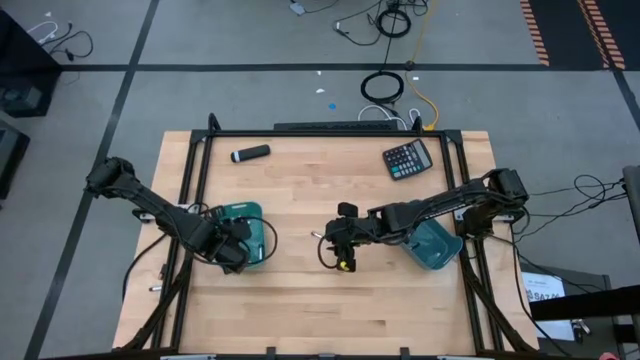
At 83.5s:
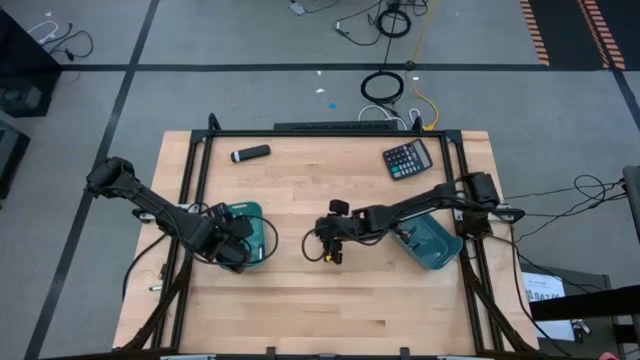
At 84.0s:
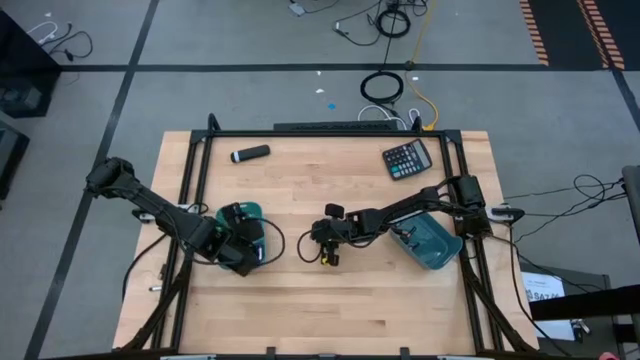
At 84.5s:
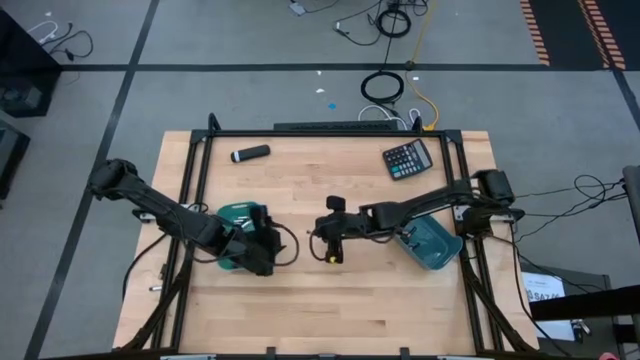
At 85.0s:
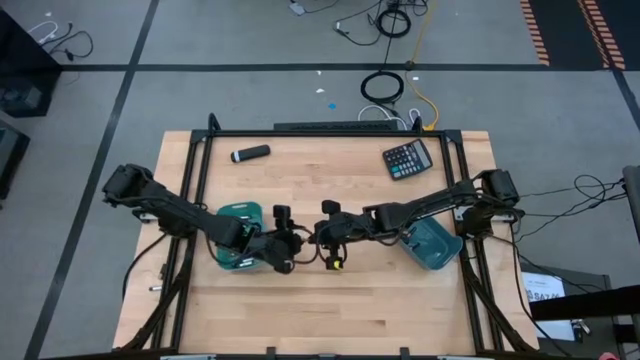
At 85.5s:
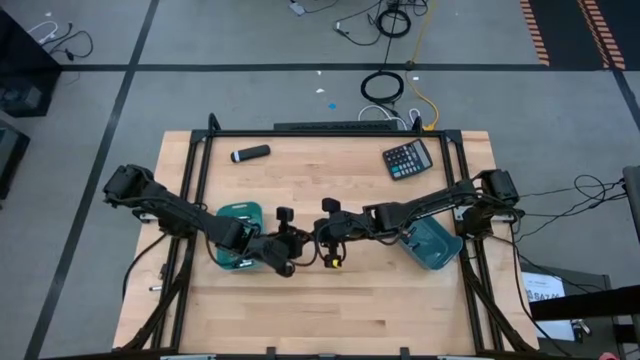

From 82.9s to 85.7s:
Task: Sort batteries
Put the silver battery into the light blue bin

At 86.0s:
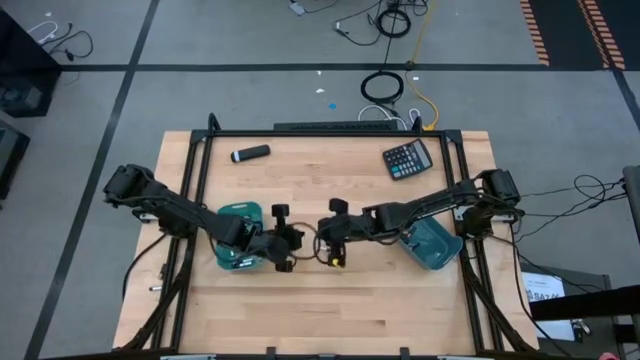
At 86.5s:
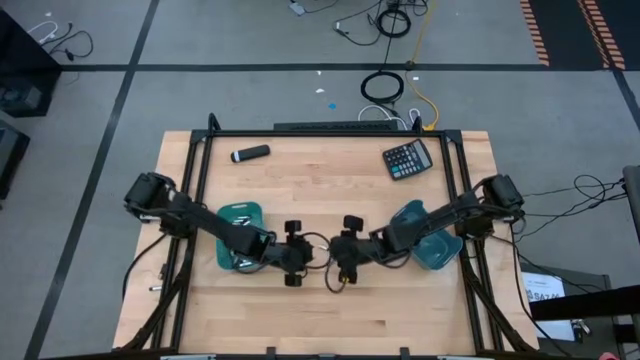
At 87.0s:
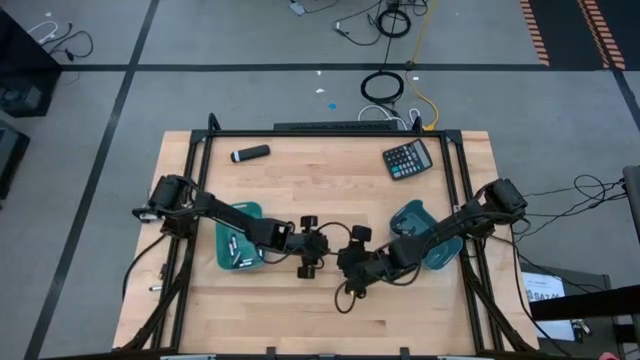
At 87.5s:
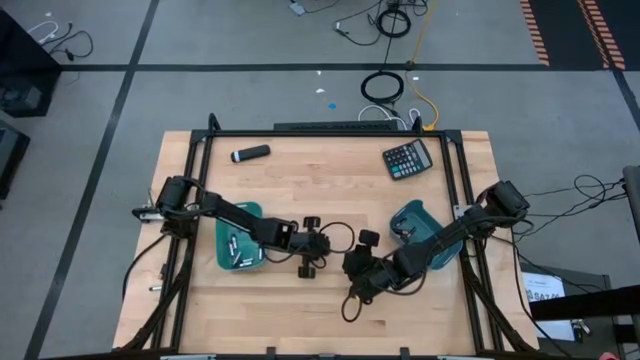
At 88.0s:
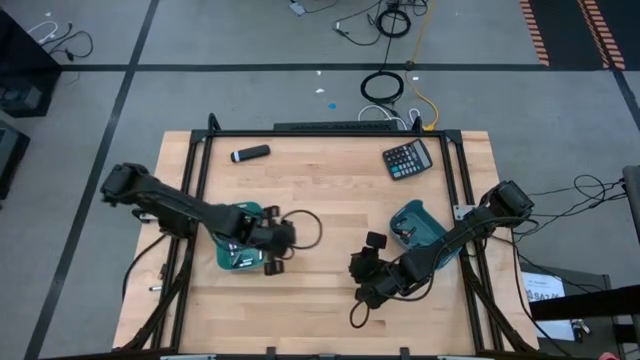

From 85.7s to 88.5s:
Put the silver battery into the light blue bin

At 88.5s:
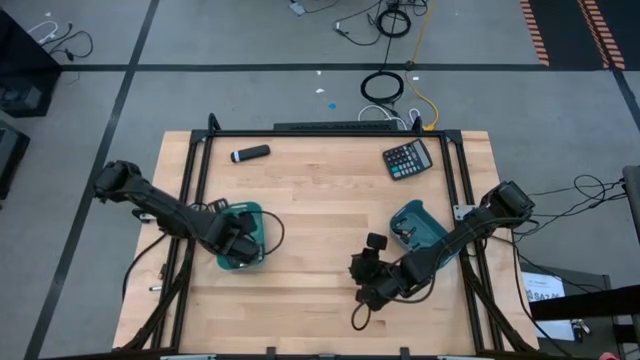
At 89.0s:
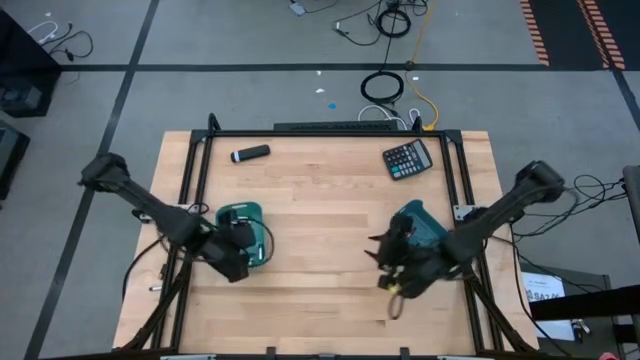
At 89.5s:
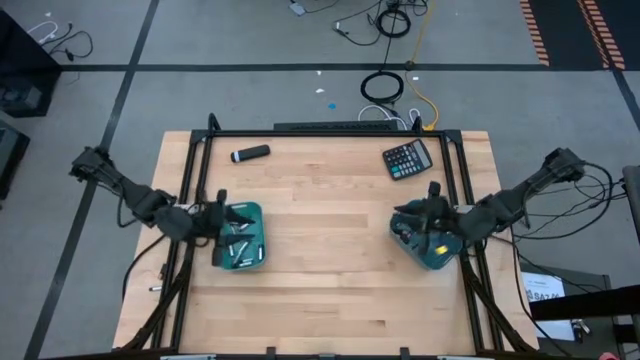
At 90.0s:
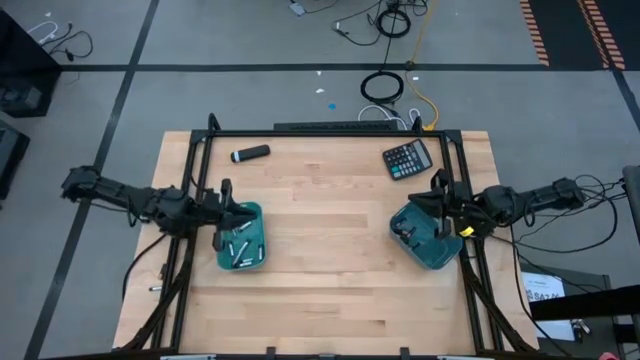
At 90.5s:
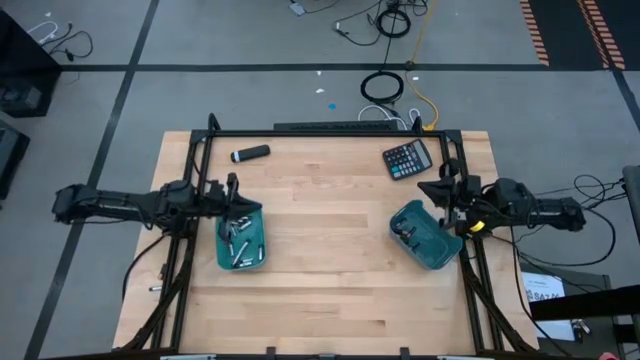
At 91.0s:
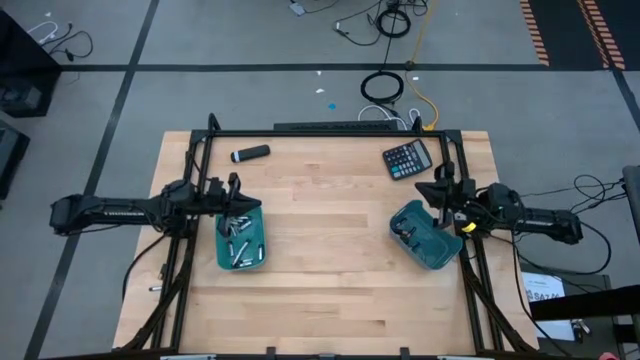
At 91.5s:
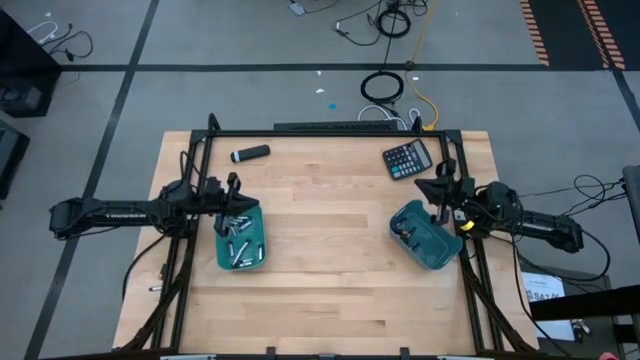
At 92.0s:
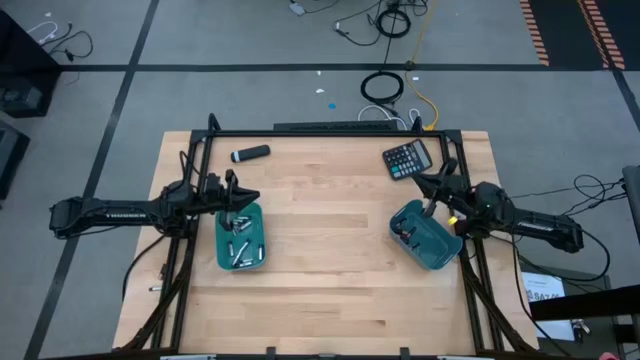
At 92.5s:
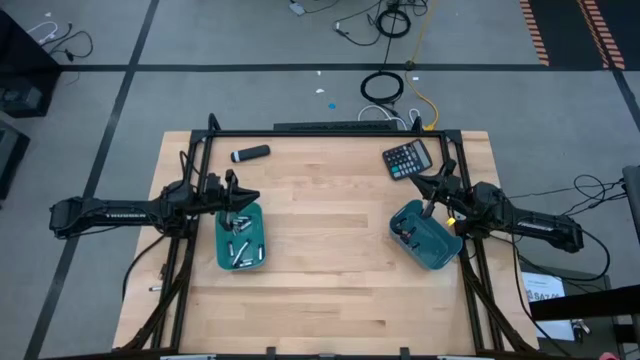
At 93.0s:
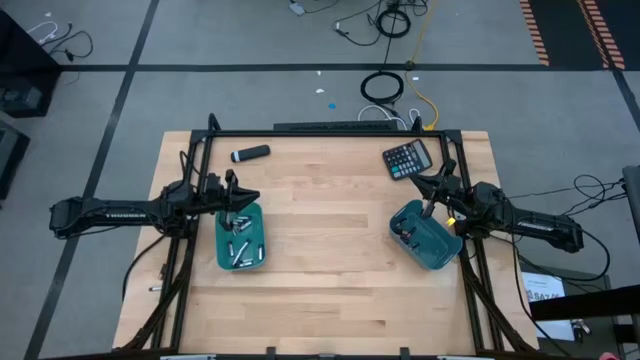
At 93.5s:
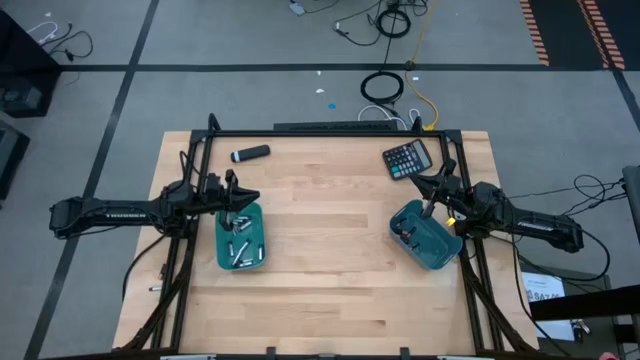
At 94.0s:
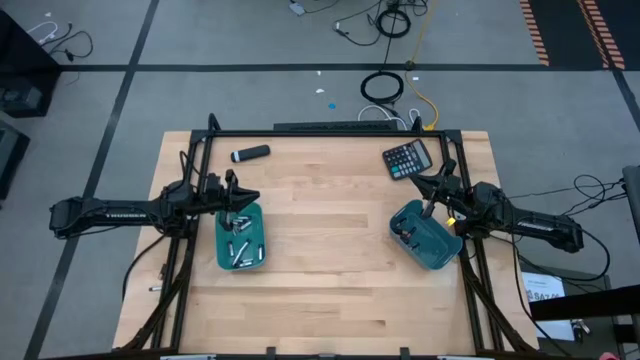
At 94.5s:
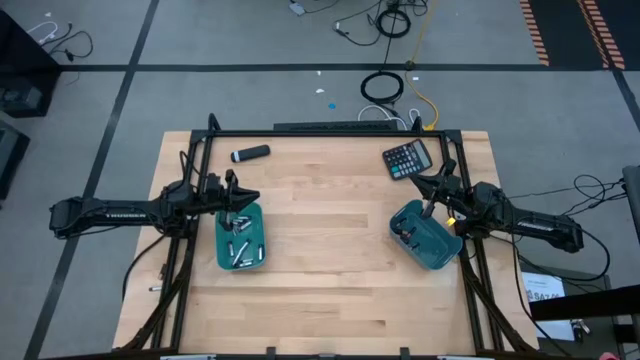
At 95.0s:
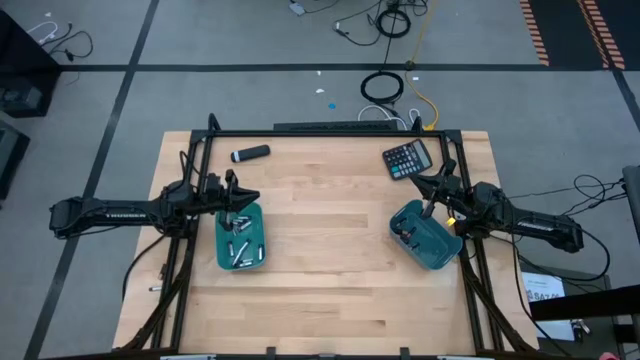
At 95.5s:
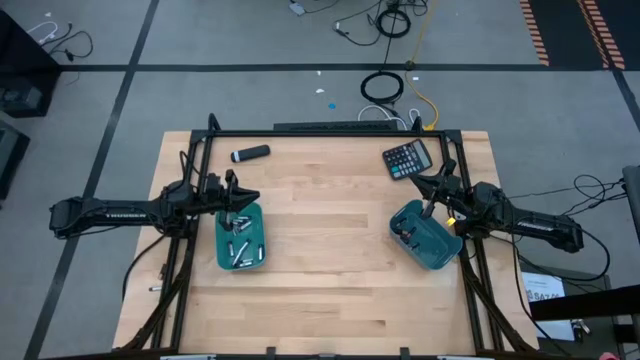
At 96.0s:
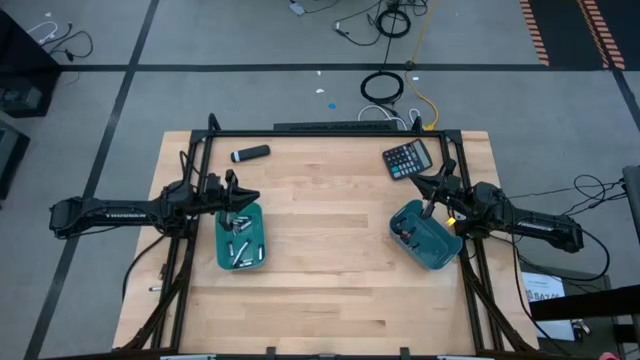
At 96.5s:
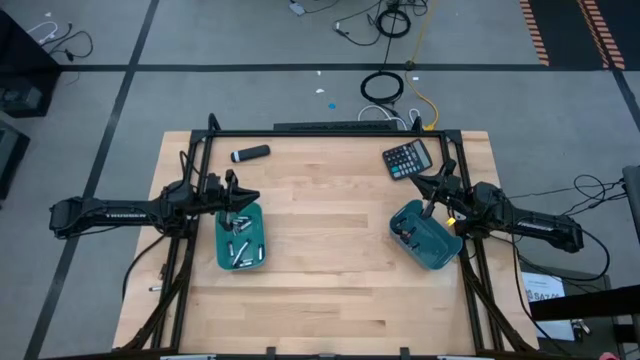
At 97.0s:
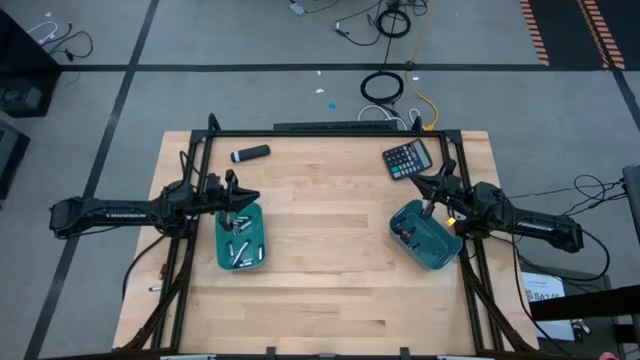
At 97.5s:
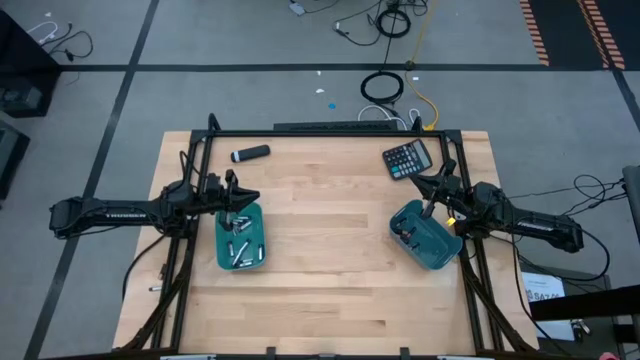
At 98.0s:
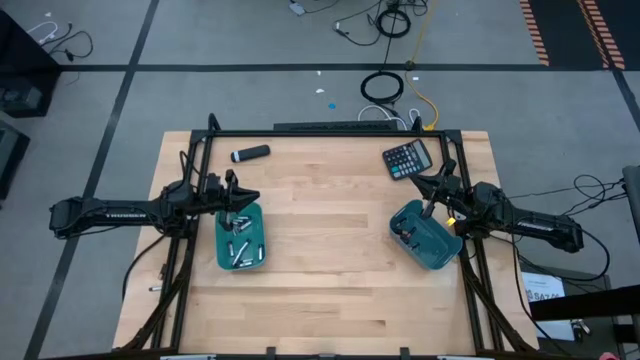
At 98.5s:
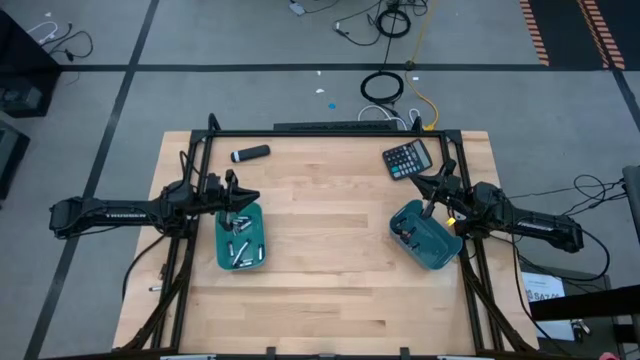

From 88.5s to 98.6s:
Return to Home Position

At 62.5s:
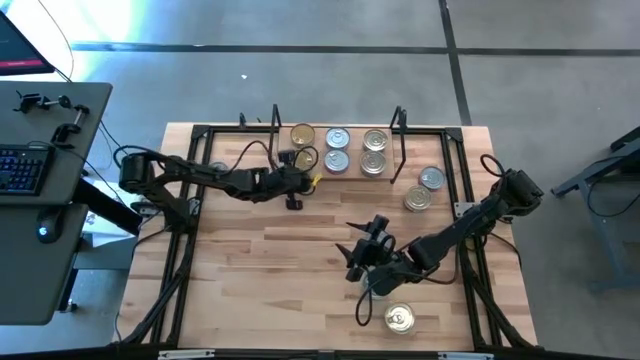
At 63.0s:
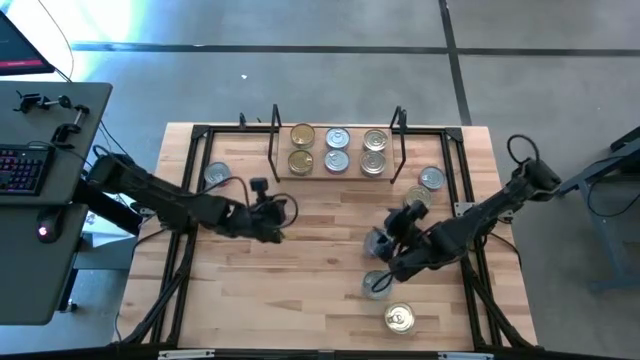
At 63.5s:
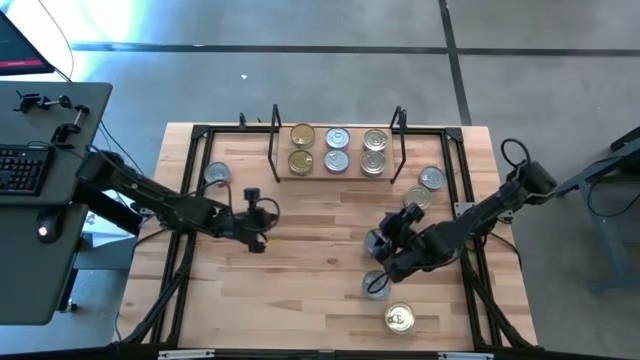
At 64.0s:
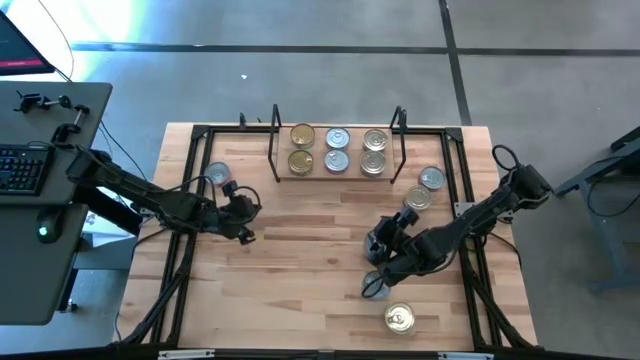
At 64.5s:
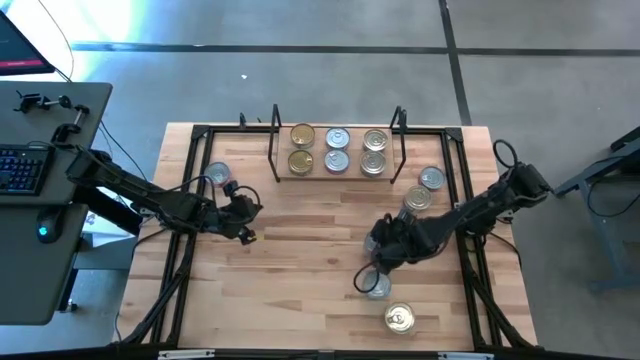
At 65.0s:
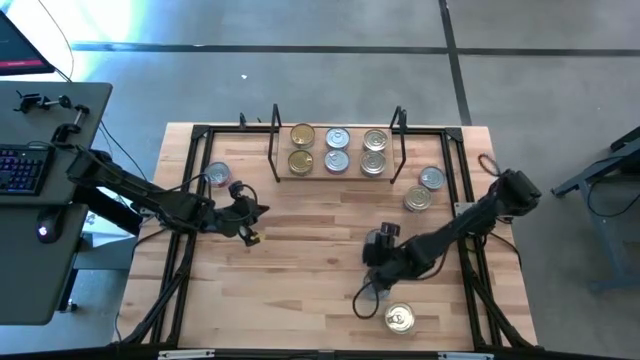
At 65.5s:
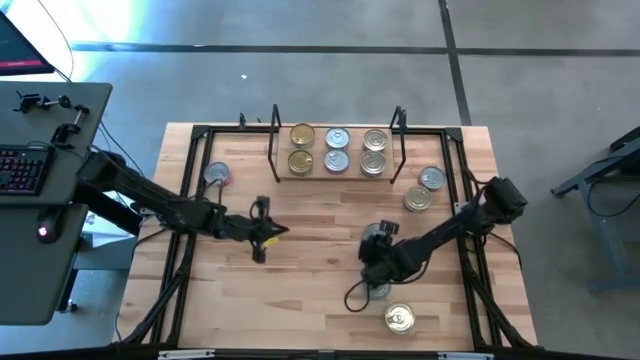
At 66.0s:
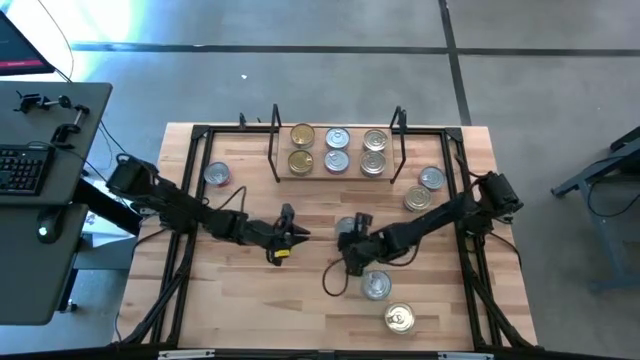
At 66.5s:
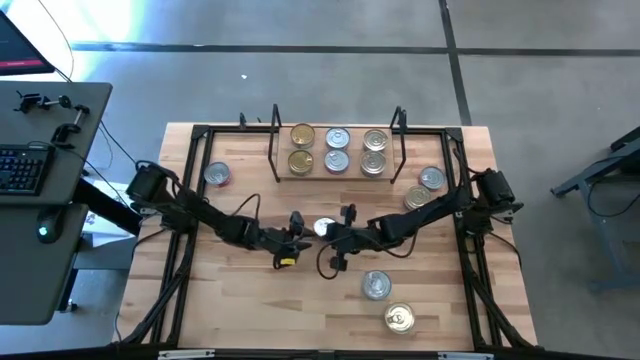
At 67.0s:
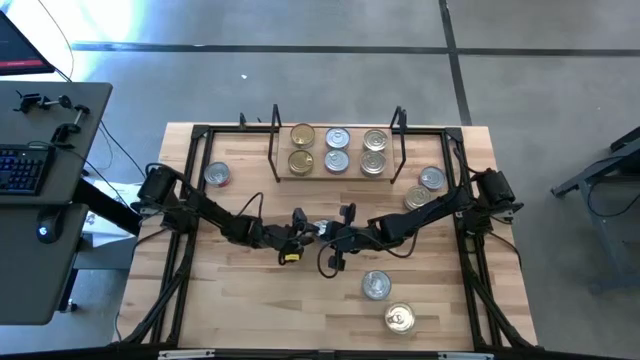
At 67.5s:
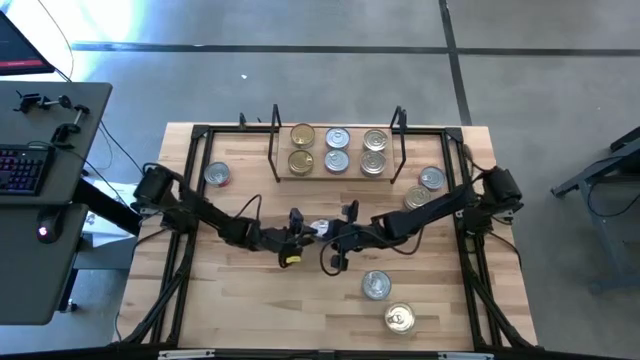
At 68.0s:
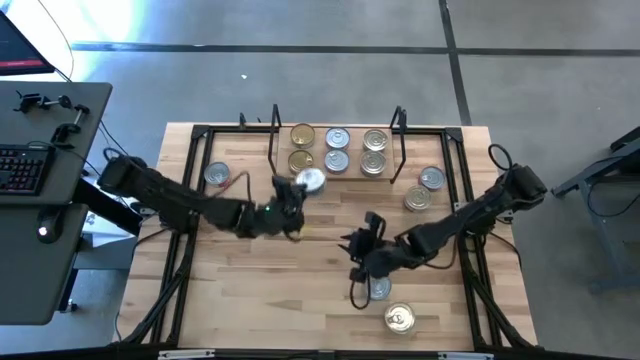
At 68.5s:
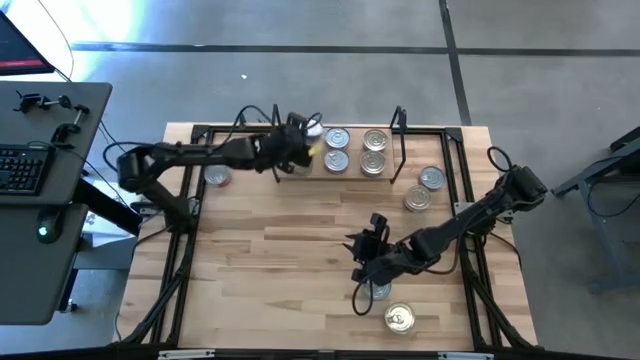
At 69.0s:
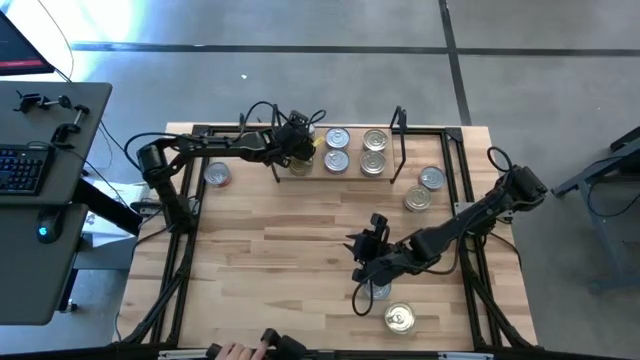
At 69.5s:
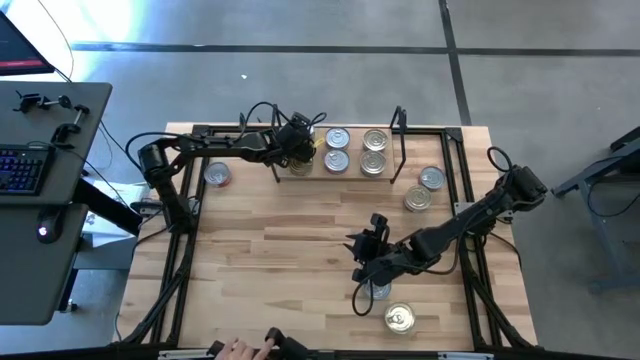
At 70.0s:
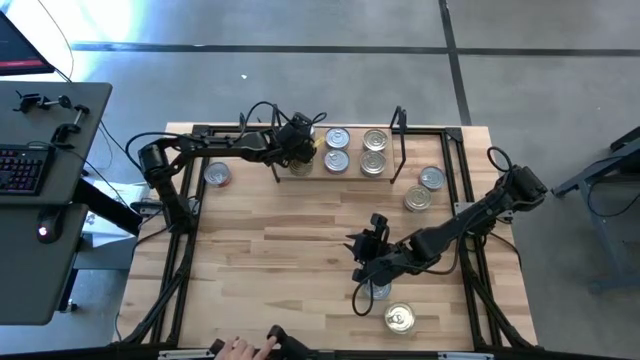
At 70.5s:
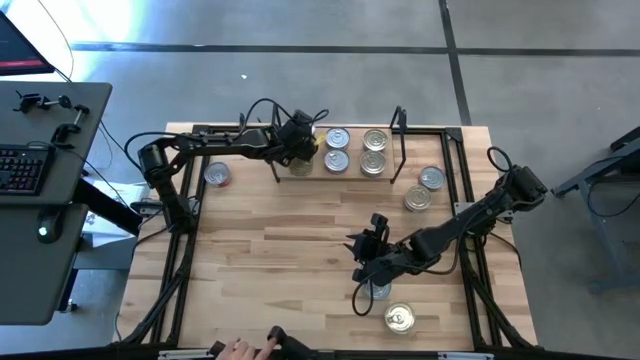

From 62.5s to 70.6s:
Task: Stack canned seafood by type on shelf
Stack the green tuna can on top of the green tuna can on the shelf
